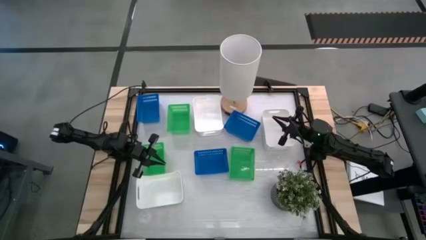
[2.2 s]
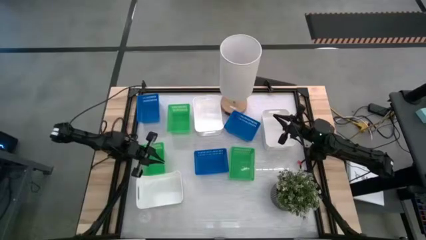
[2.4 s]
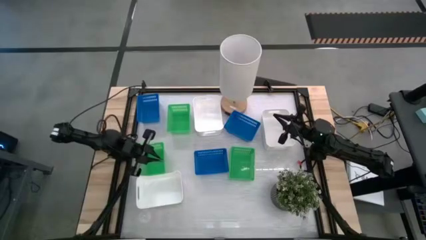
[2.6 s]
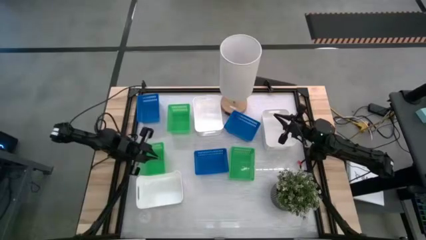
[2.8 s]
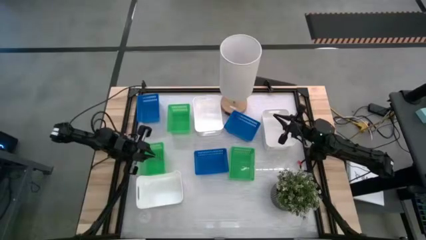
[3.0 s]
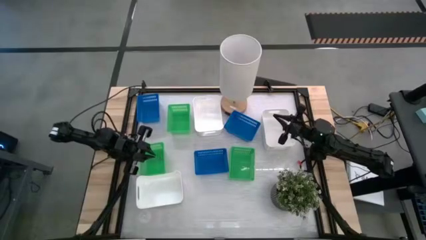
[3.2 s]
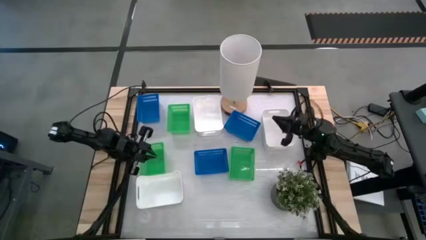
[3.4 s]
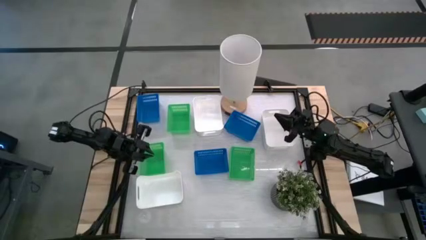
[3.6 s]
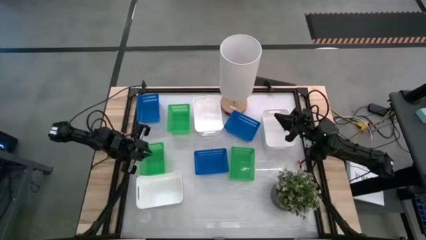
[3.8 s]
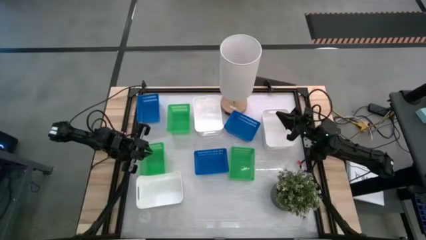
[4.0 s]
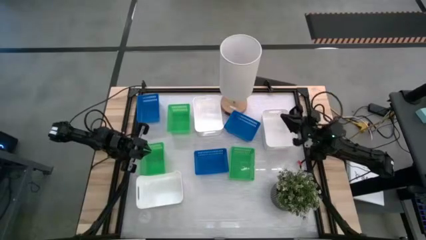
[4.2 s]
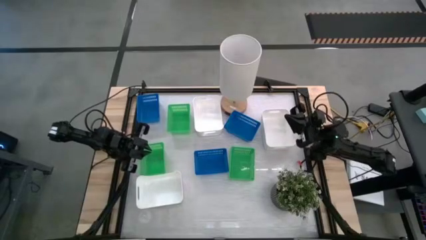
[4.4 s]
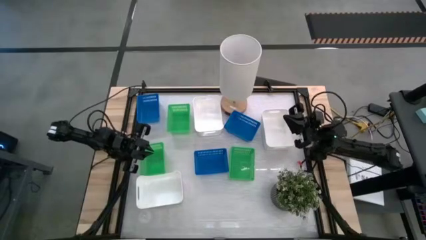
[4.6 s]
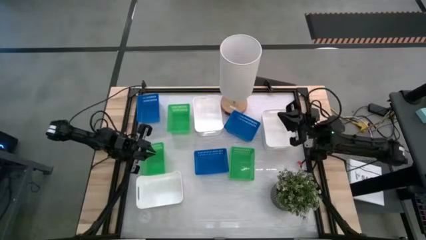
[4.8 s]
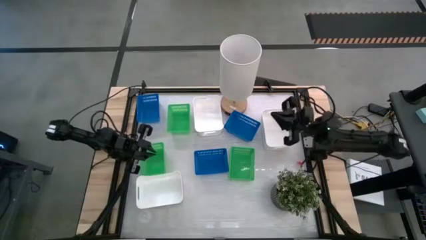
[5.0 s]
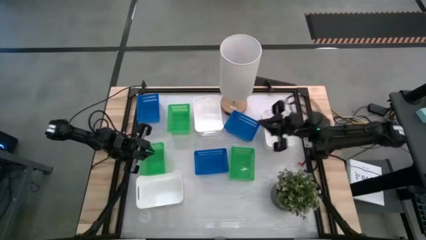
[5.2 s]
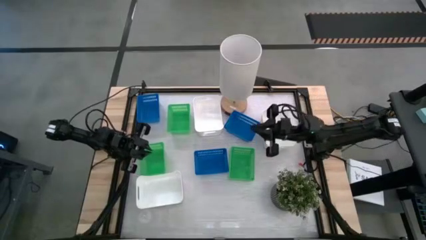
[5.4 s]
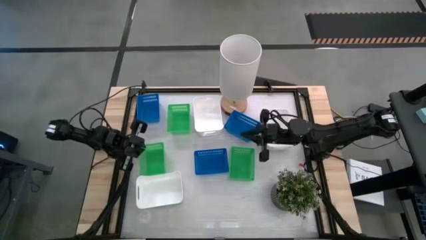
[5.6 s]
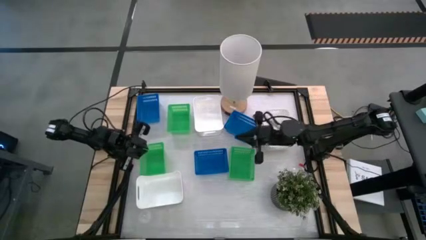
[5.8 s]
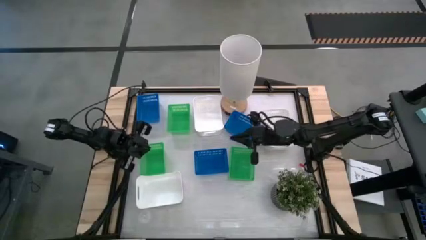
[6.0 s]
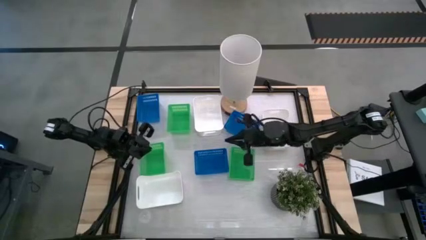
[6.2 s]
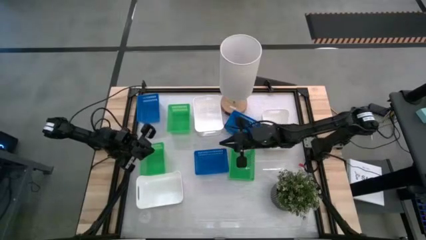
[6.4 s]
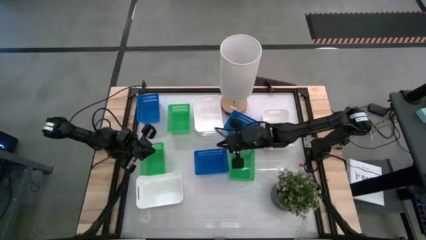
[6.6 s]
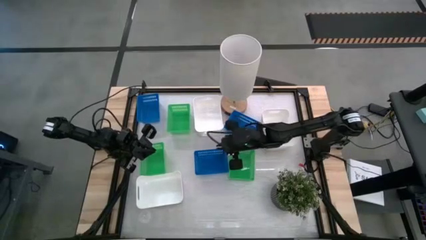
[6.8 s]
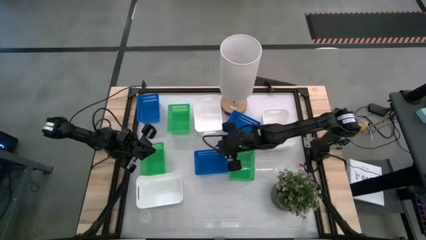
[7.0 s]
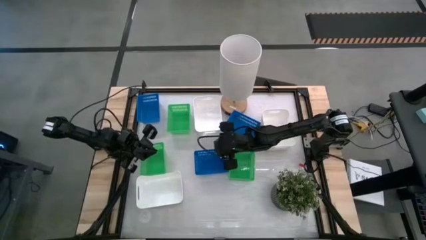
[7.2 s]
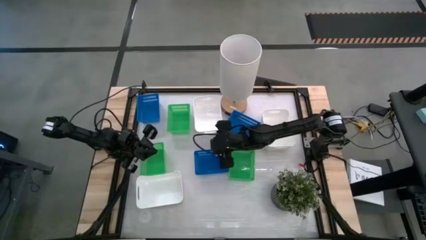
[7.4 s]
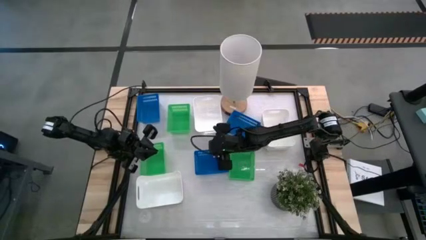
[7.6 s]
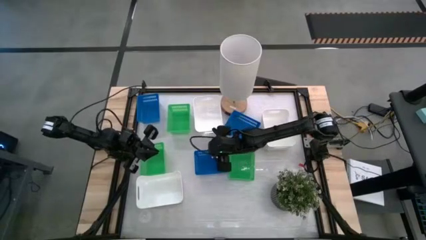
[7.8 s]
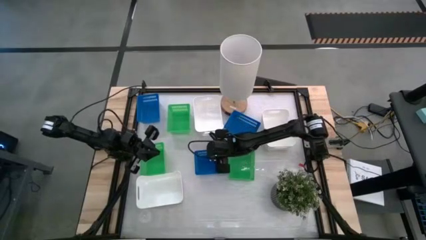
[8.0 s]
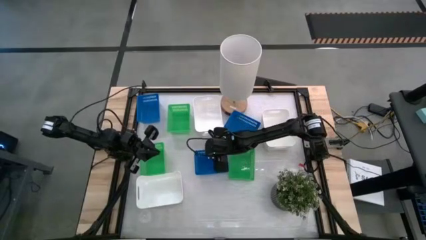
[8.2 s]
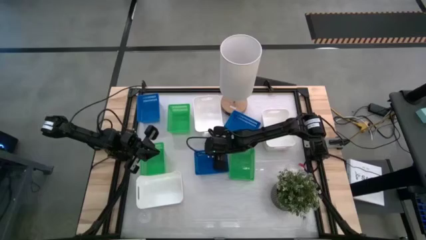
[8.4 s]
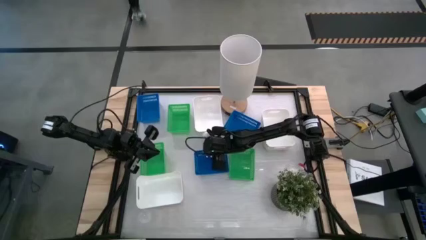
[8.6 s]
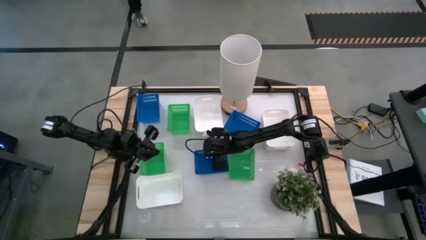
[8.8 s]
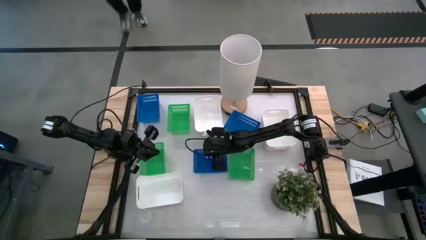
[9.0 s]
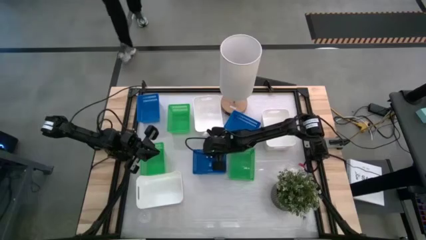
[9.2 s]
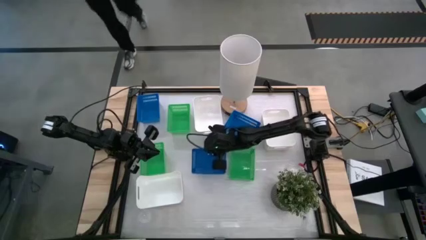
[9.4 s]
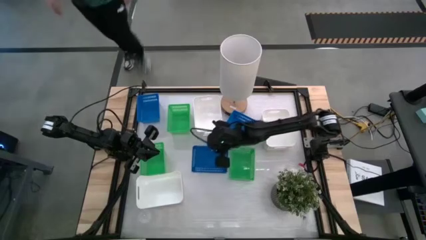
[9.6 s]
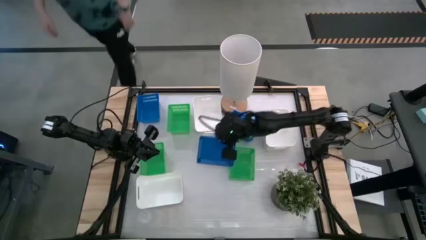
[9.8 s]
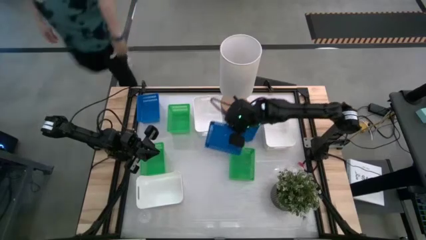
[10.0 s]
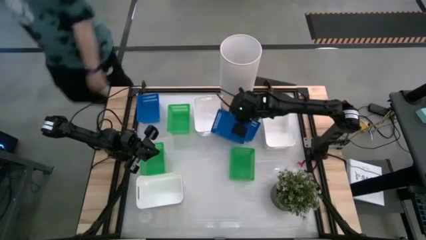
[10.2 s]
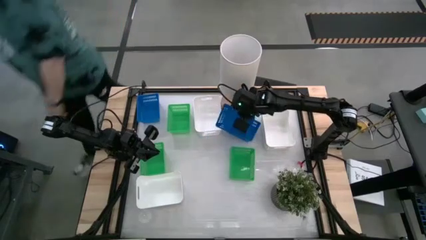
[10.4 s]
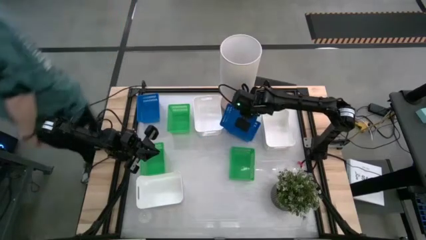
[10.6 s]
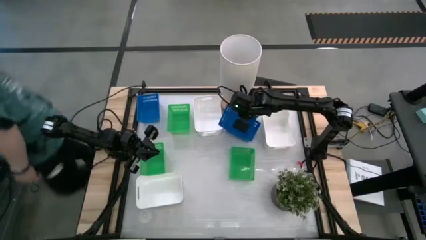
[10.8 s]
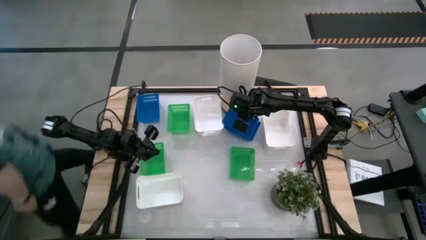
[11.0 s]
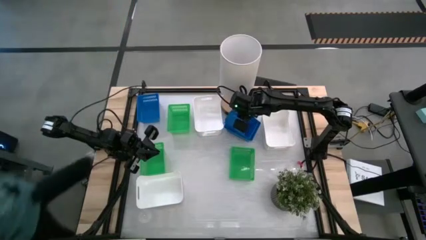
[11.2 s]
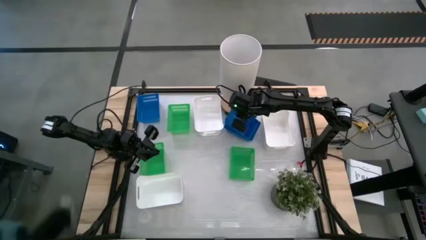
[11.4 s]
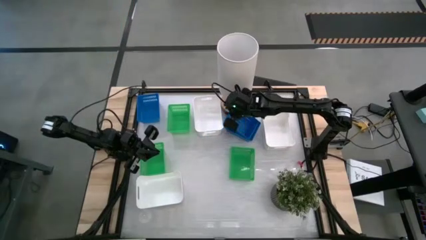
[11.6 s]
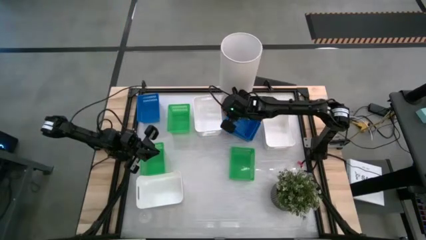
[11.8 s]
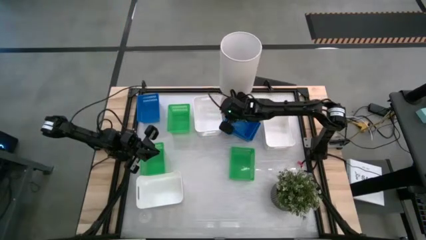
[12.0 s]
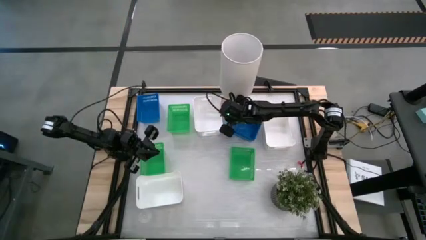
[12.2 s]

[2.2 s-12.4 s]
Stack the bottom blue bin on top of the right blue bin on the table
